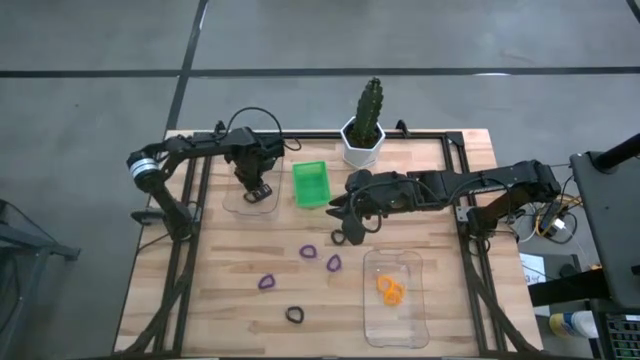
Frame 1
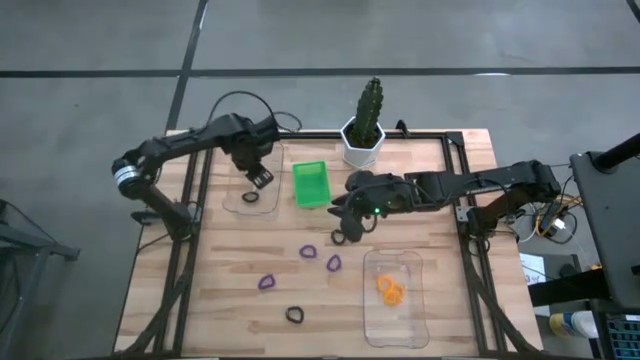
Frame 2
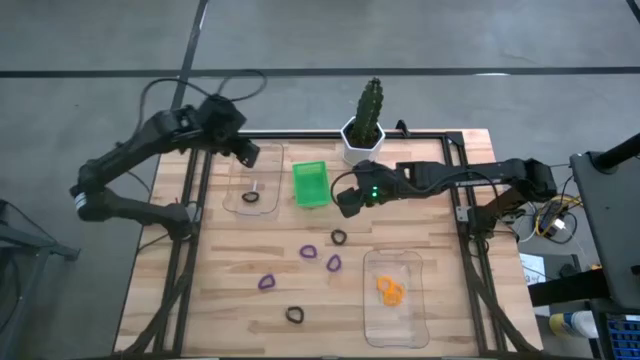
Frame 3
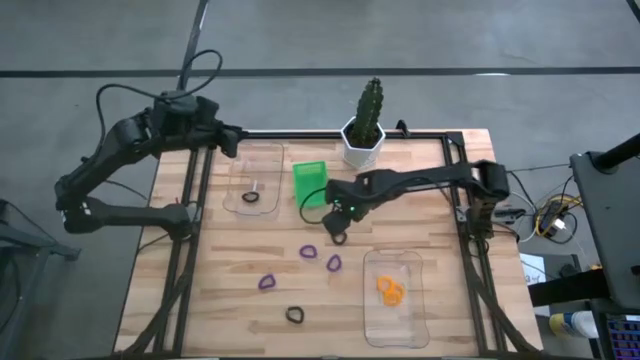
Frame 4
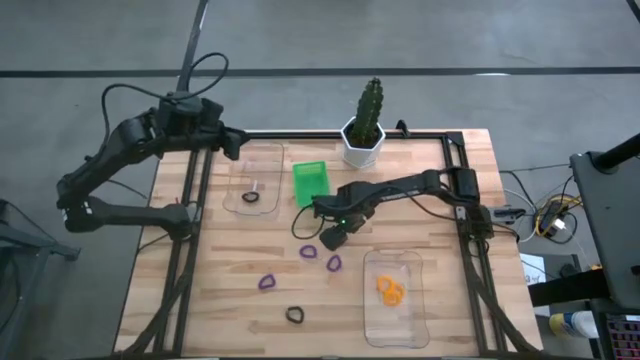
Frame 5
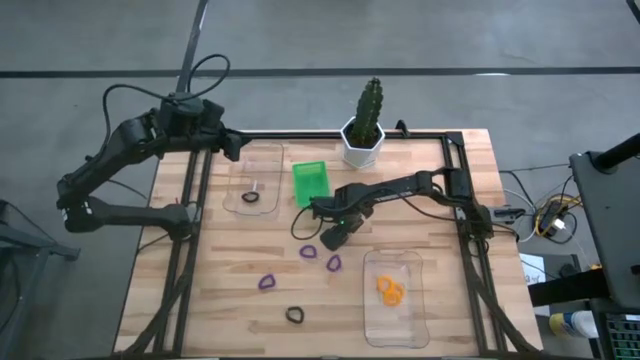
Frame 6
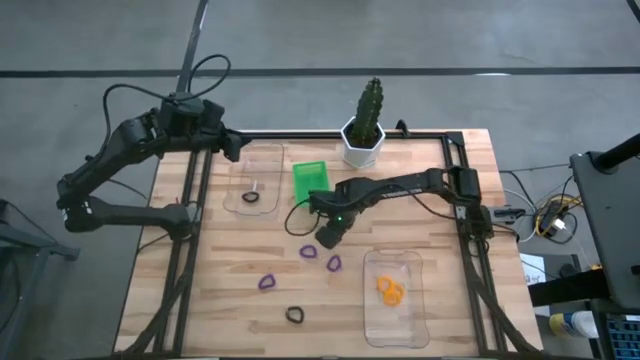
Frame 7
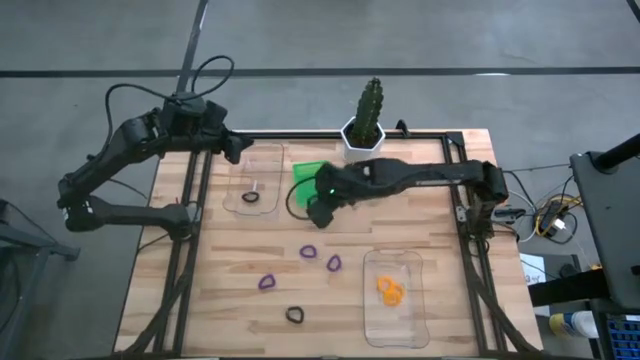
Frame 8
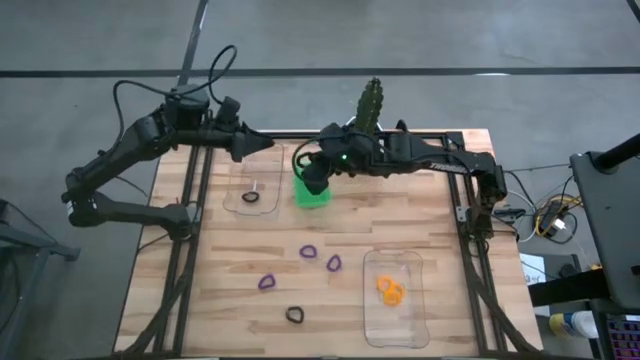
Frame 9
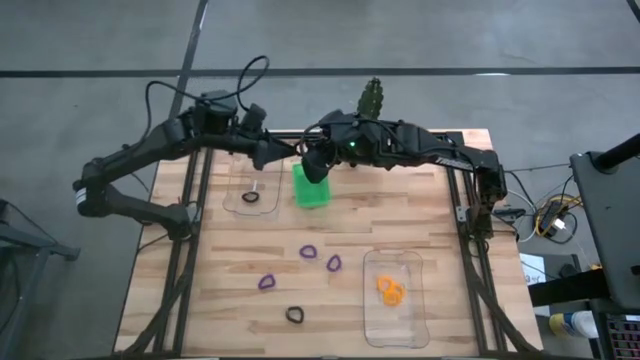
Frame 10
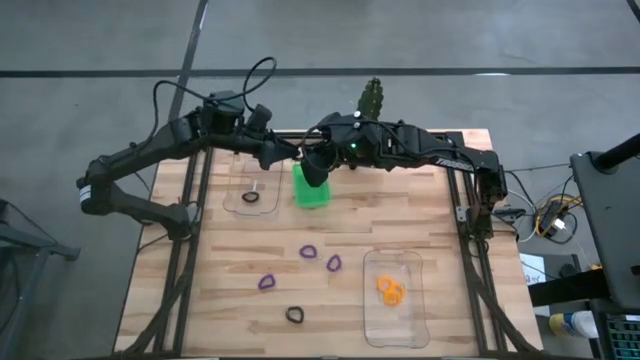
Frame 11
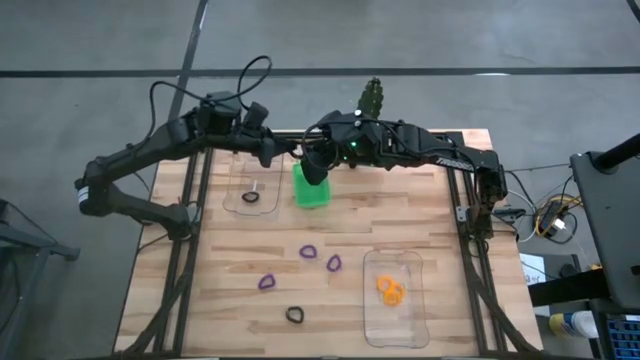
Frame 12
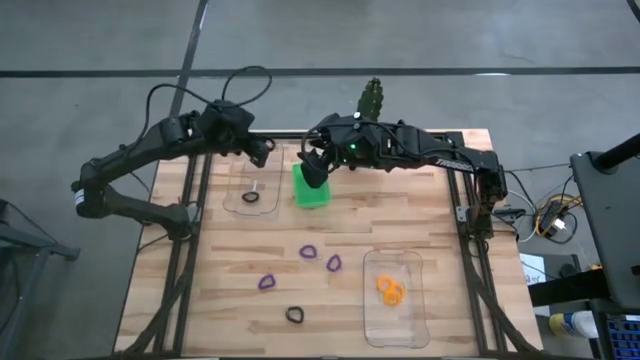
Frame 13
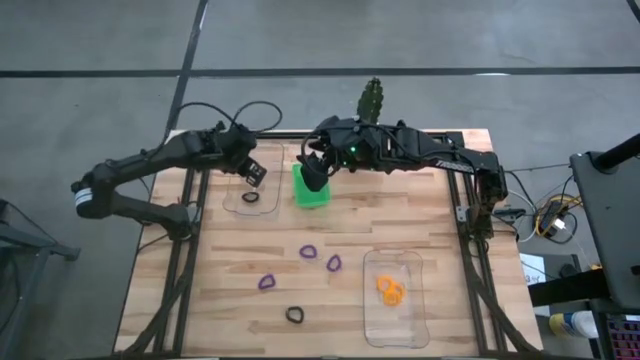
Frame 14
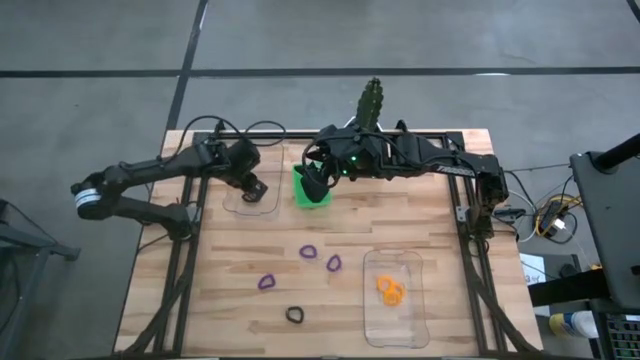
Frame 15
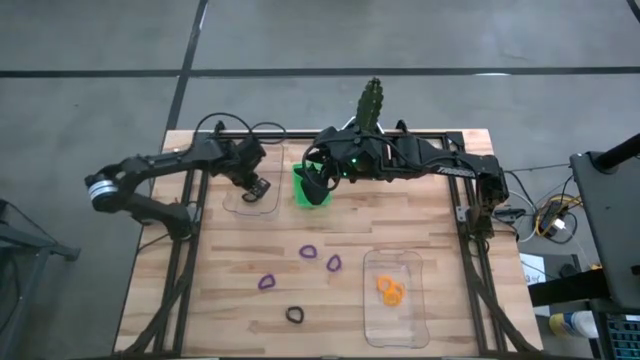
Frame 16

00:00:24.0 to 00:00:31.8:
Task: Sort spring keychains
Put the top black spring keychain into the top transparent bin

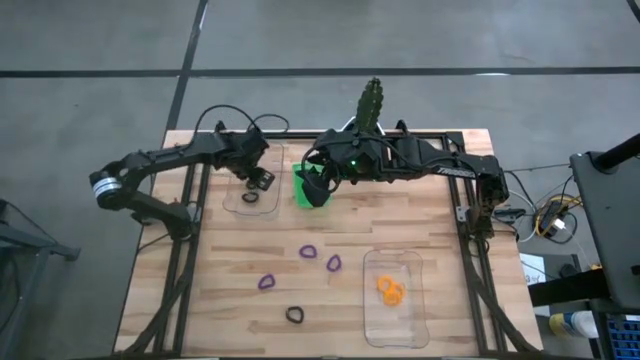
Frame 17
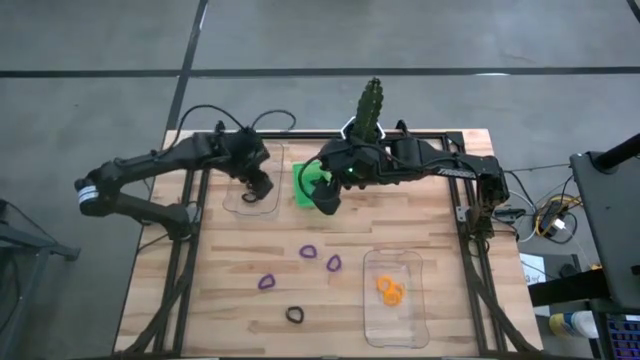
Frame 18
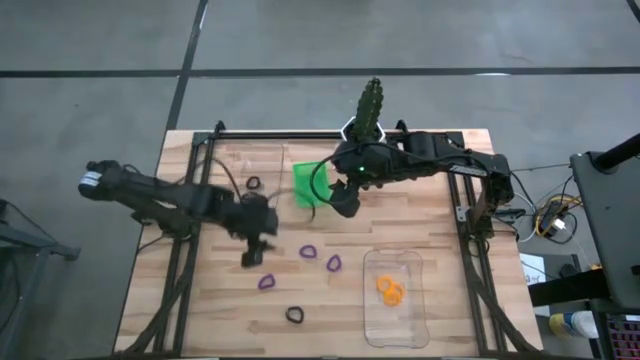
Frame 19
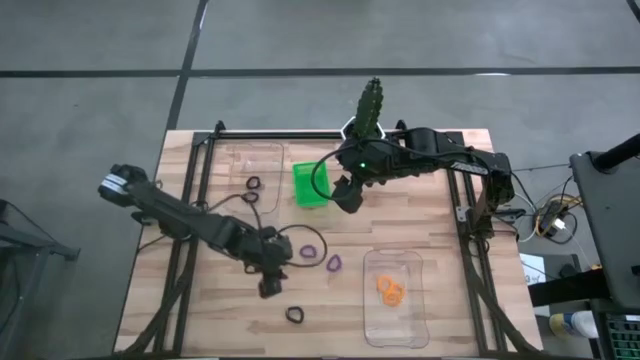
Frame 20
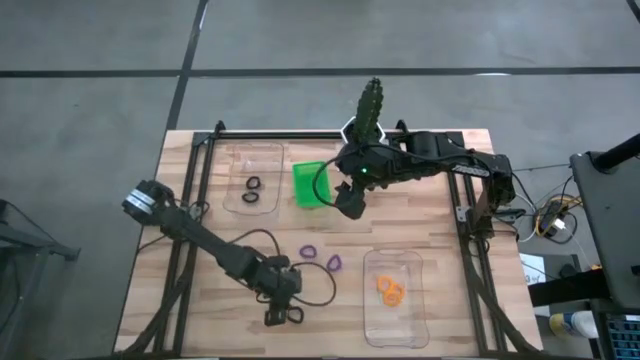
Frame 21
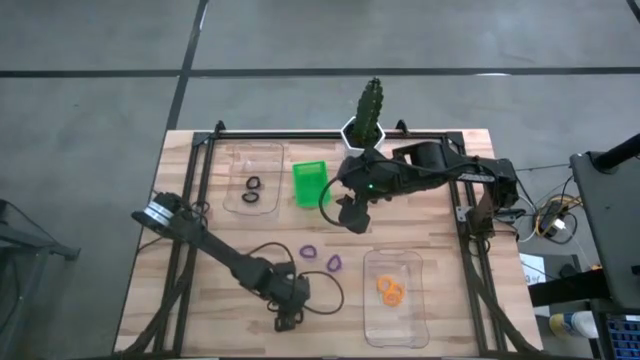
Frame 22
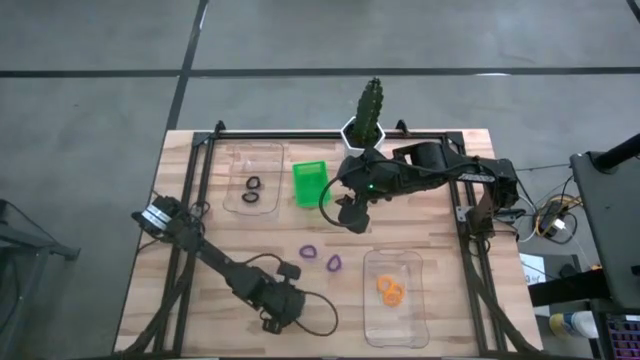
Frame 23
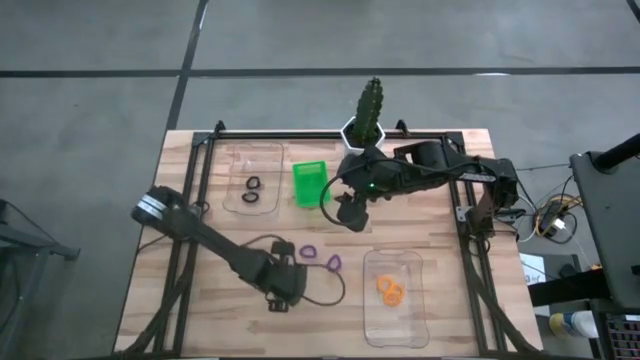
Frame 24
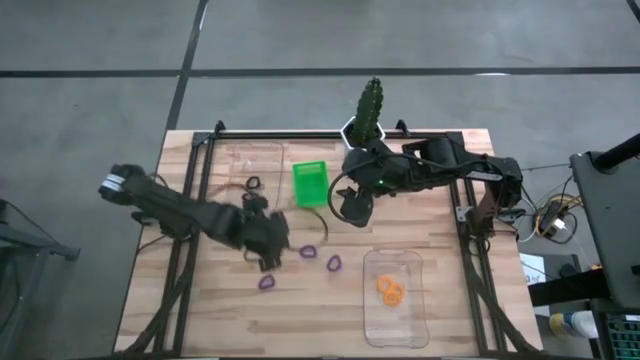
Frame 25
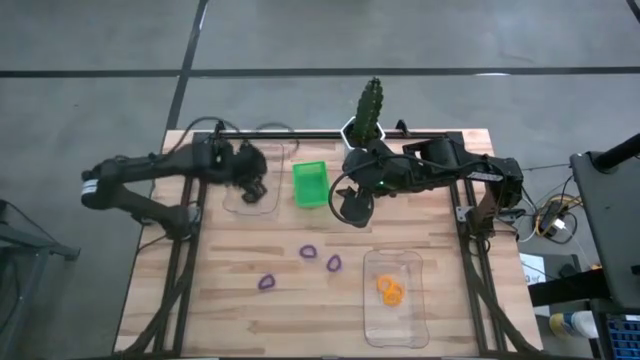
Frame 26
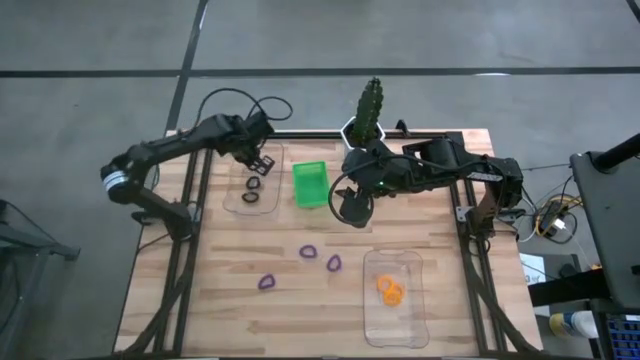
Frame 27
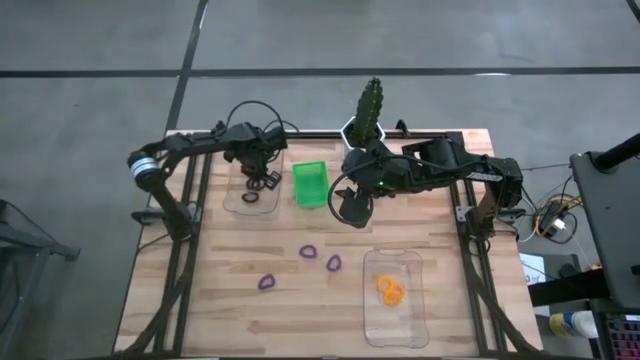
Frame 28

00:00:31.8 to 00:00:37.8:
Put the black spring keychain into the top transparent bin

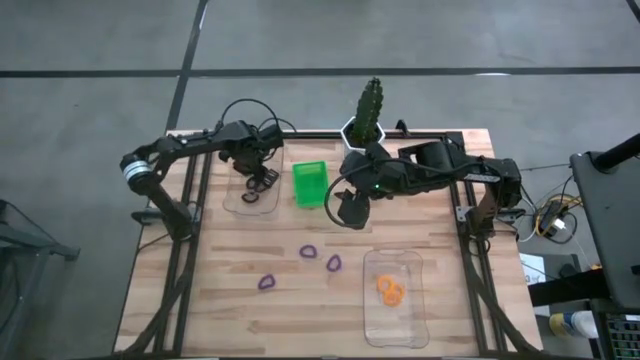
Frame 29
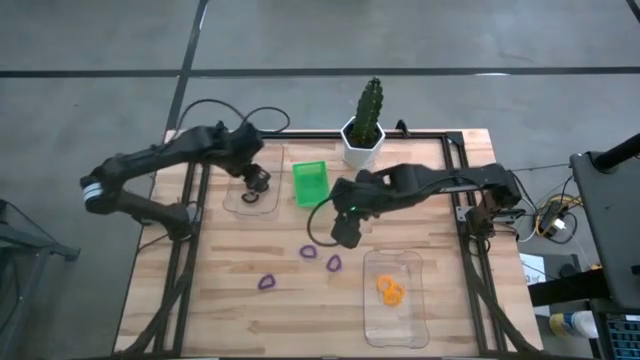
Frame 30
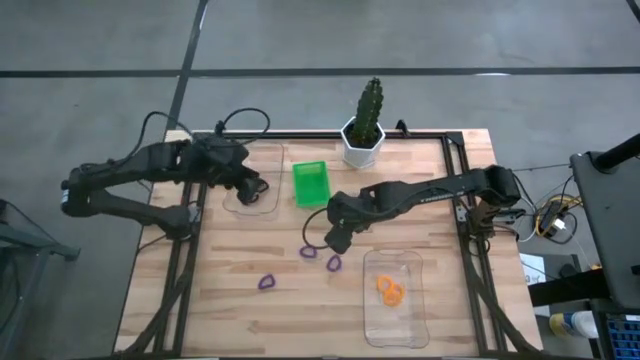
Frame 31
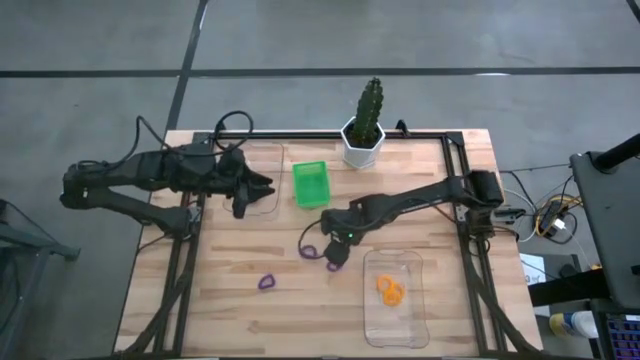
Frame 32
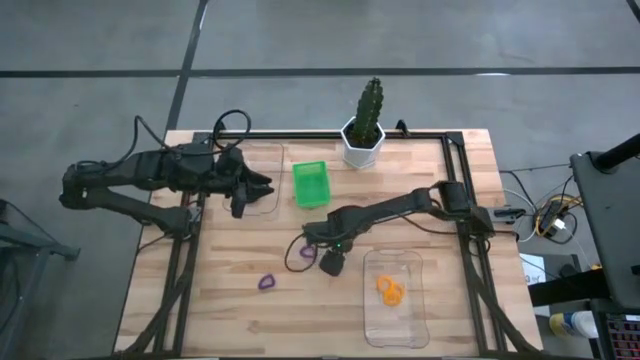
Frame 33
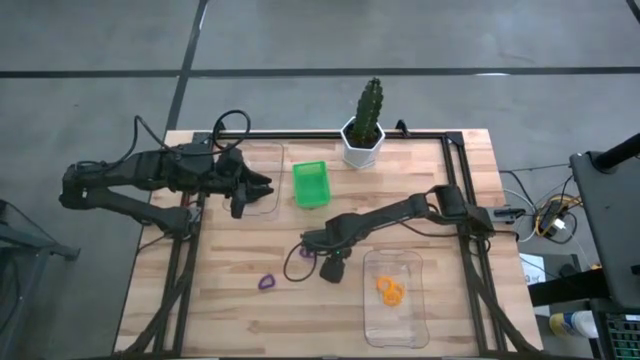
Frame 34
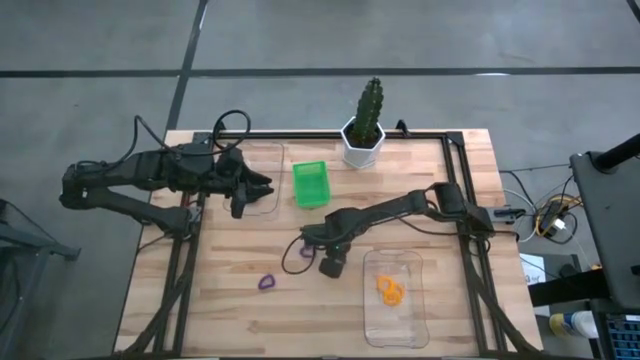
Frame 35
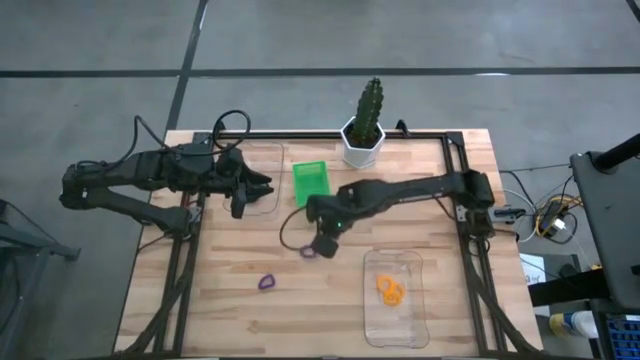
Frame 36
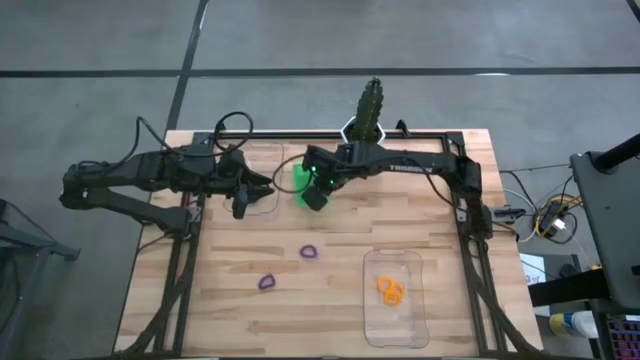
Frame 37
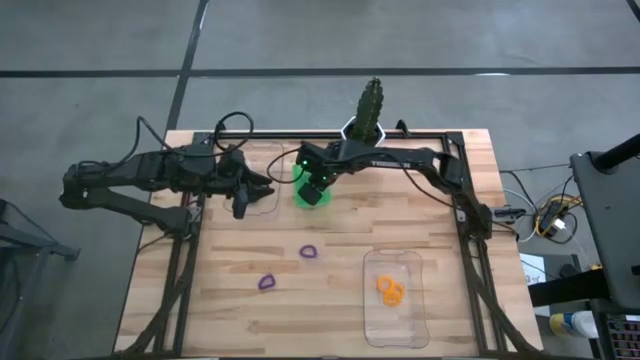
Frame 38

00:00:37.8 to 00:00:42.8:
Put the right violet spring keychain into the green bin

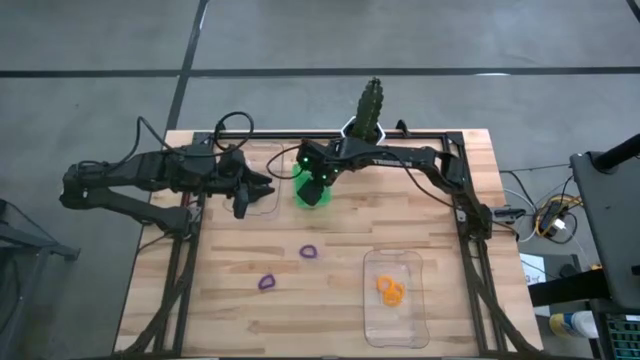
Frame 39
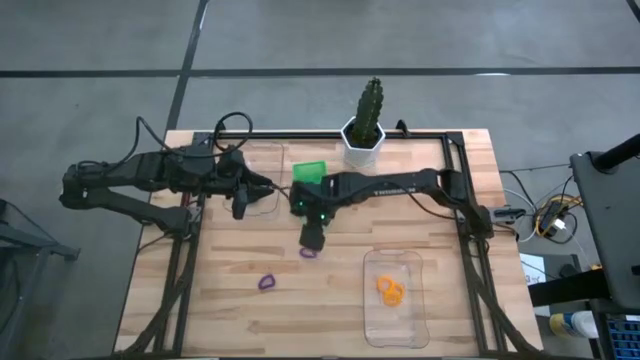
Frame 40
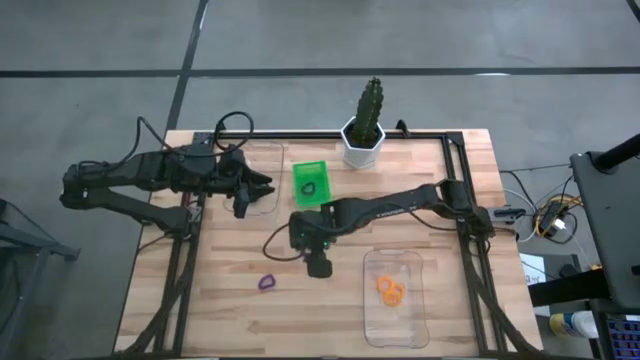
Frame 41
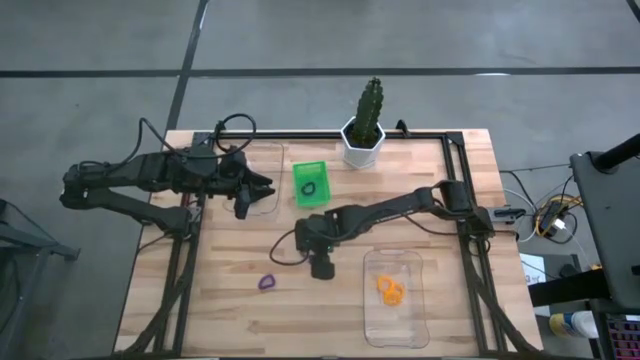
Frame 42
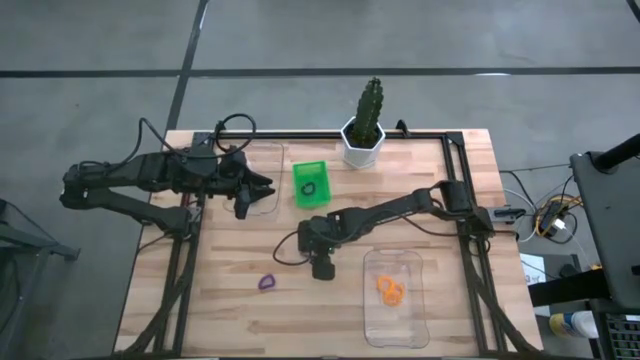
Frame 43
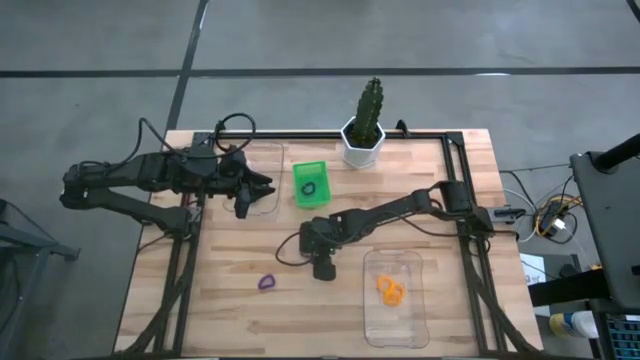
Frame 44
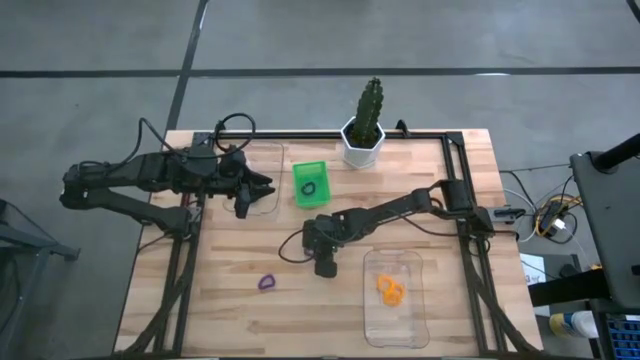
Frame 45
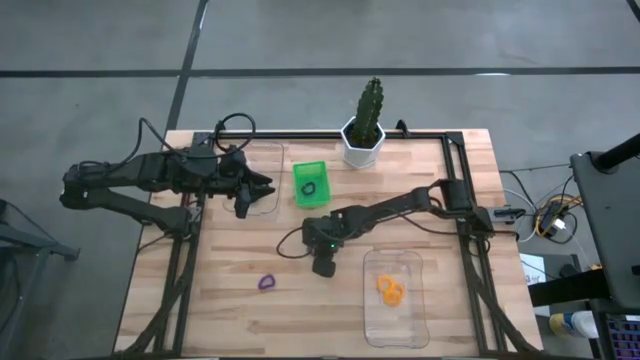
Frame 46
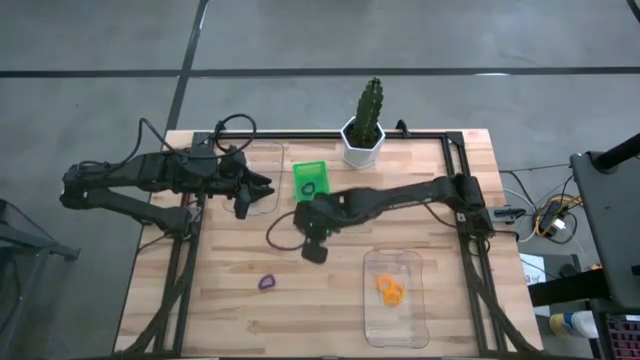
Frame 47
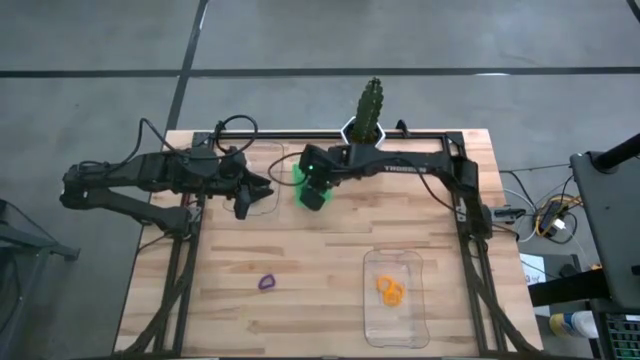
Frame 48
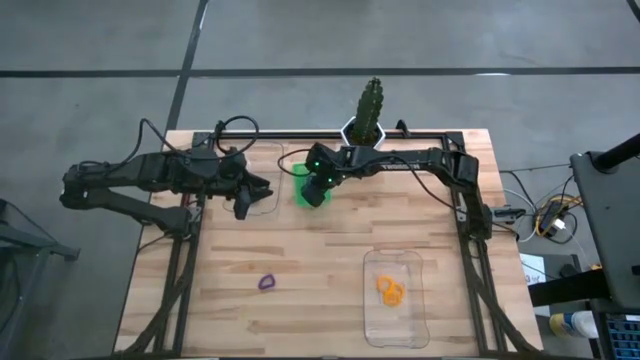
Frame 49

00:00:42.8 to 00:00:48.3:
Put the top violet spring keychain into the green bin
